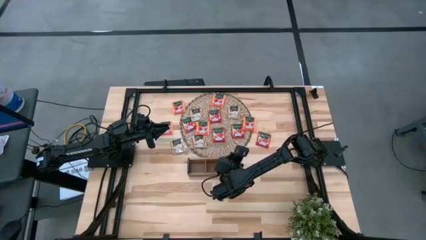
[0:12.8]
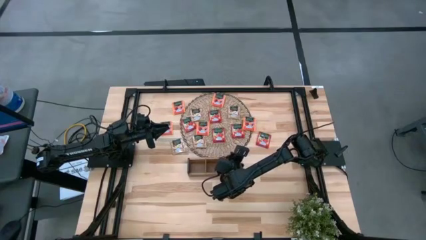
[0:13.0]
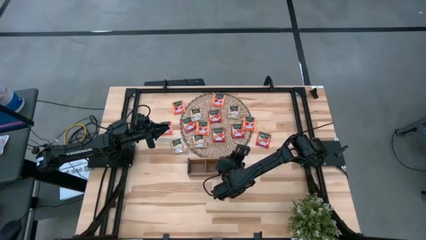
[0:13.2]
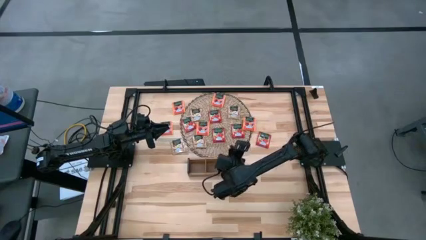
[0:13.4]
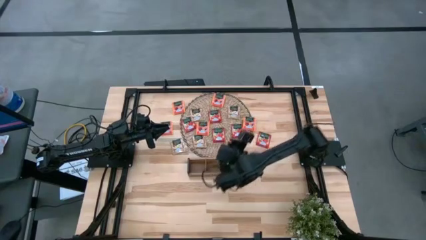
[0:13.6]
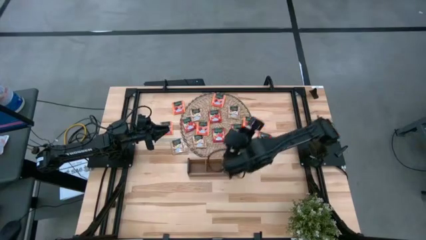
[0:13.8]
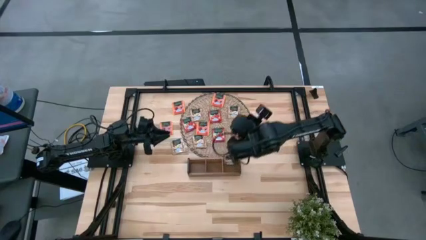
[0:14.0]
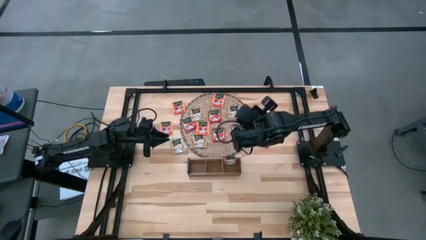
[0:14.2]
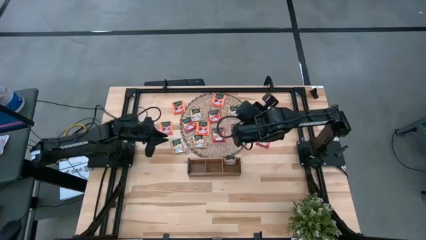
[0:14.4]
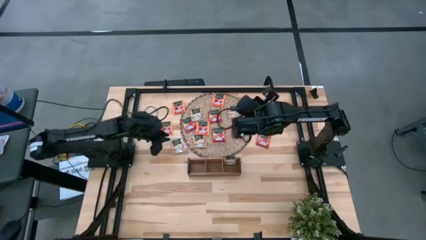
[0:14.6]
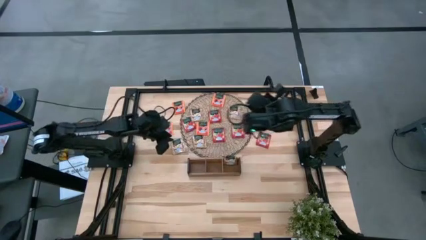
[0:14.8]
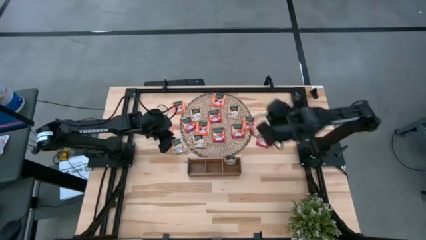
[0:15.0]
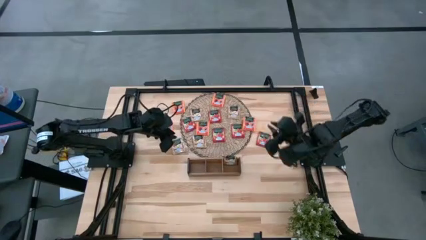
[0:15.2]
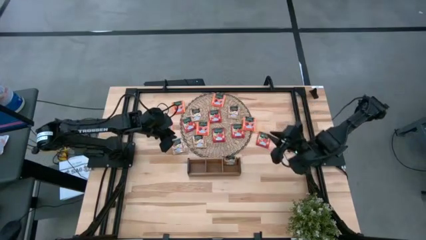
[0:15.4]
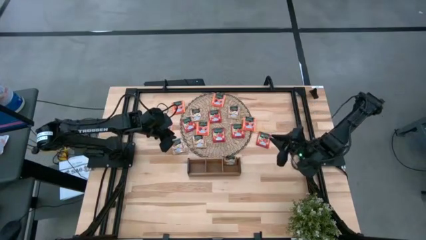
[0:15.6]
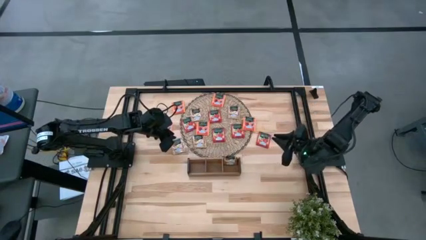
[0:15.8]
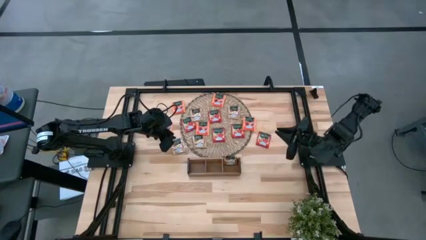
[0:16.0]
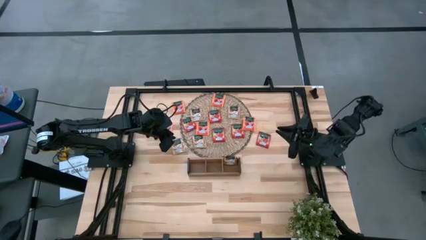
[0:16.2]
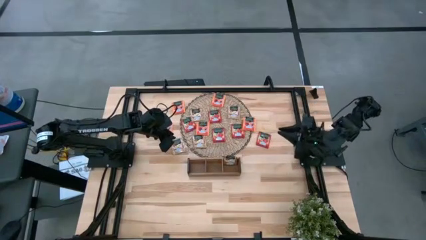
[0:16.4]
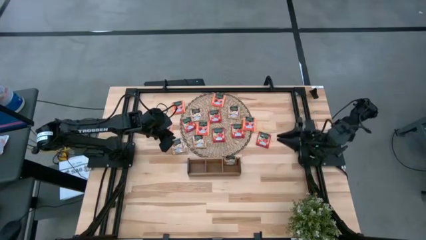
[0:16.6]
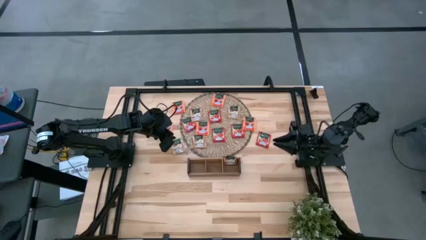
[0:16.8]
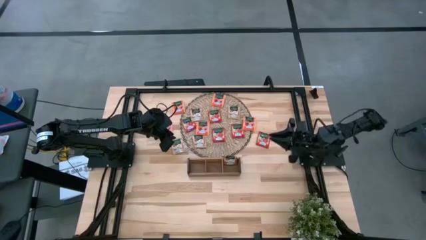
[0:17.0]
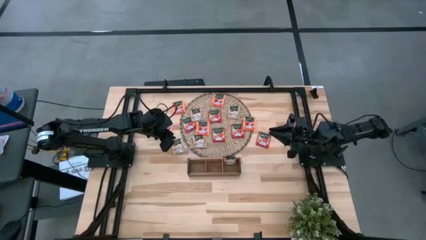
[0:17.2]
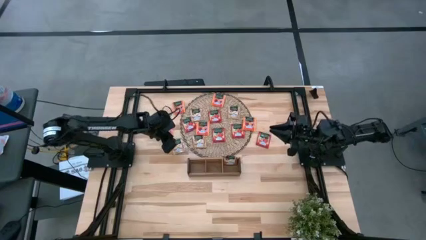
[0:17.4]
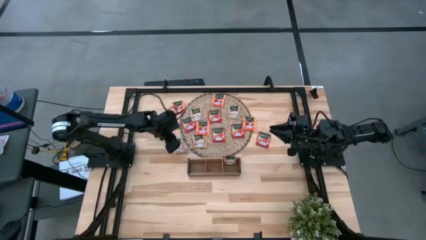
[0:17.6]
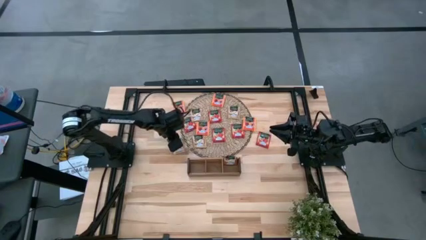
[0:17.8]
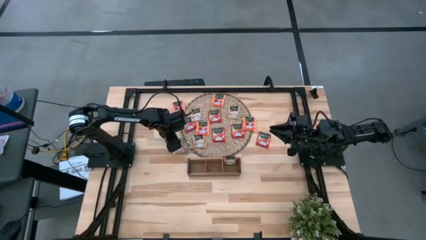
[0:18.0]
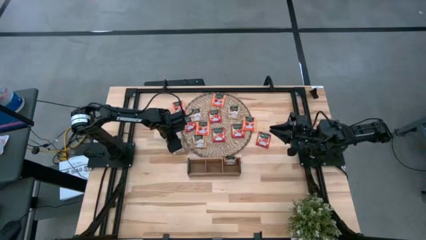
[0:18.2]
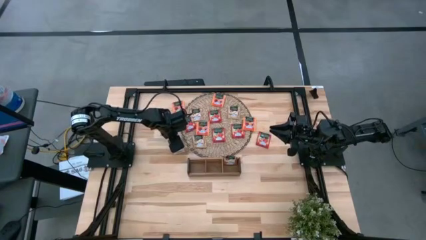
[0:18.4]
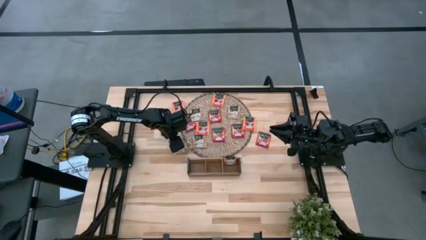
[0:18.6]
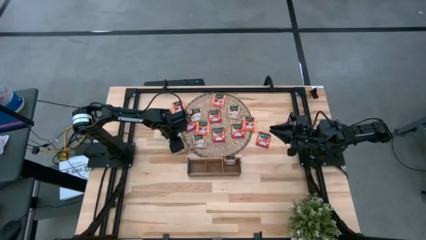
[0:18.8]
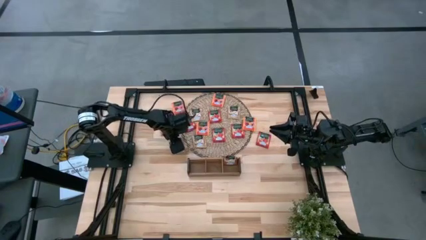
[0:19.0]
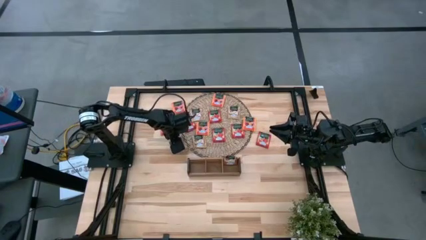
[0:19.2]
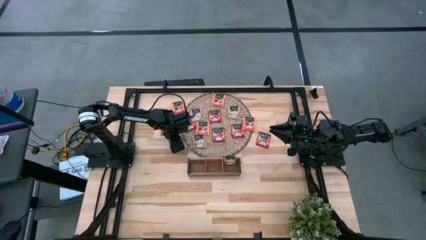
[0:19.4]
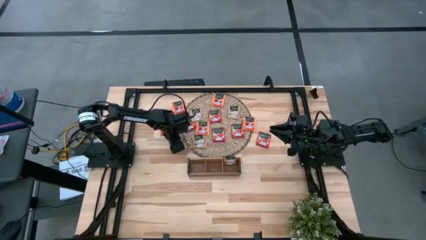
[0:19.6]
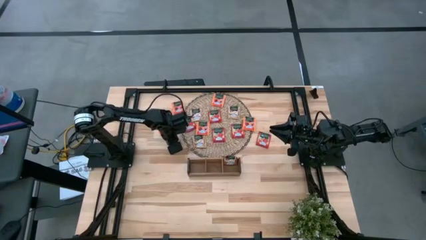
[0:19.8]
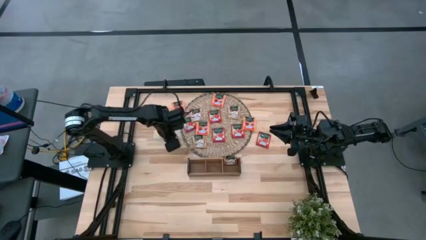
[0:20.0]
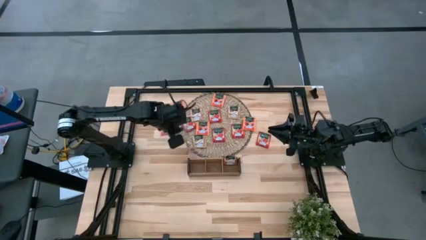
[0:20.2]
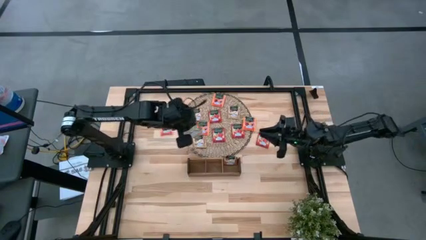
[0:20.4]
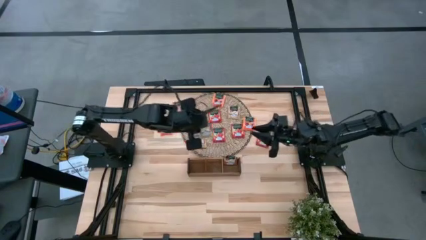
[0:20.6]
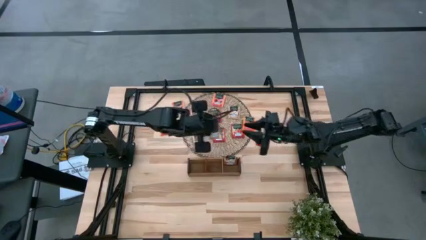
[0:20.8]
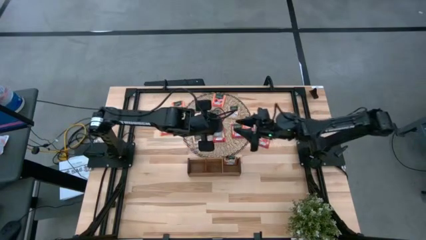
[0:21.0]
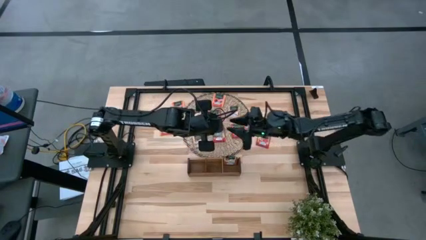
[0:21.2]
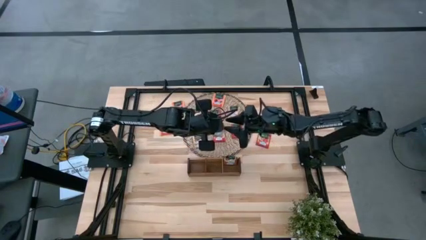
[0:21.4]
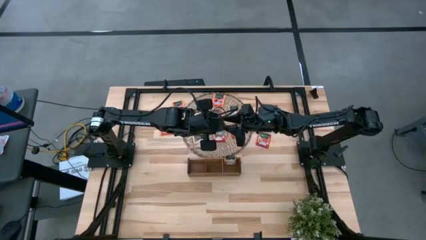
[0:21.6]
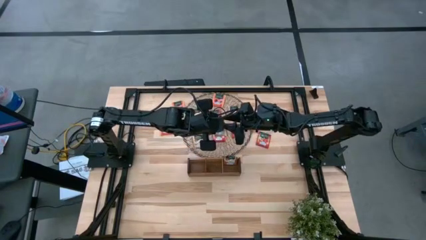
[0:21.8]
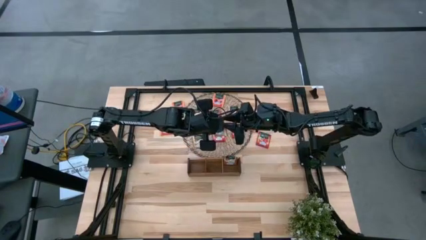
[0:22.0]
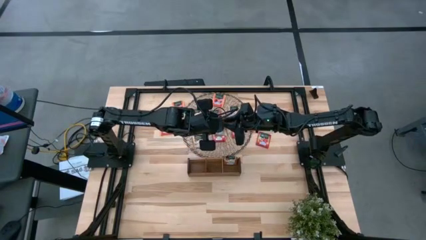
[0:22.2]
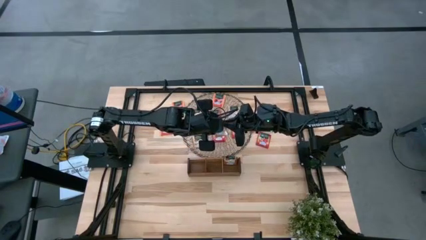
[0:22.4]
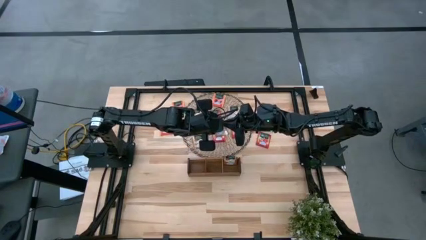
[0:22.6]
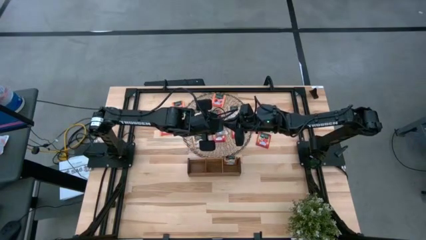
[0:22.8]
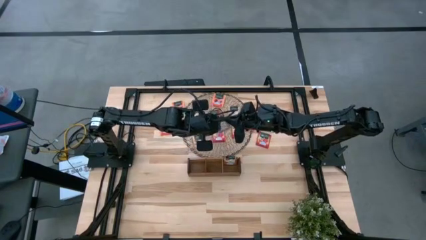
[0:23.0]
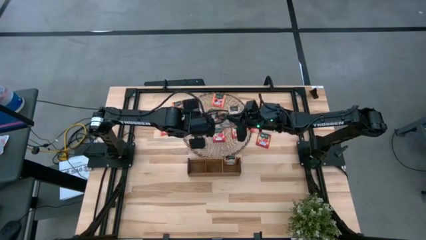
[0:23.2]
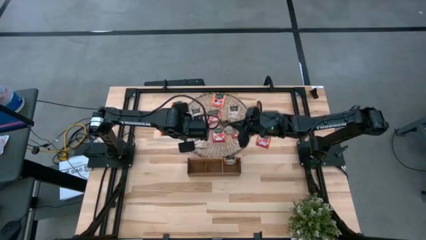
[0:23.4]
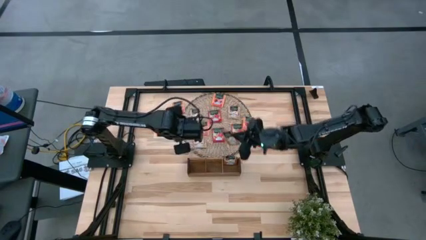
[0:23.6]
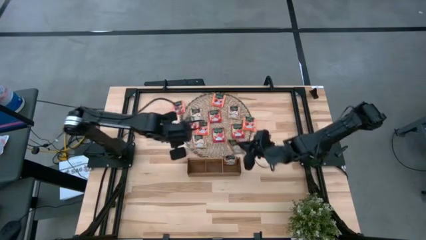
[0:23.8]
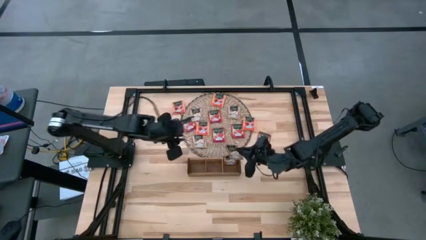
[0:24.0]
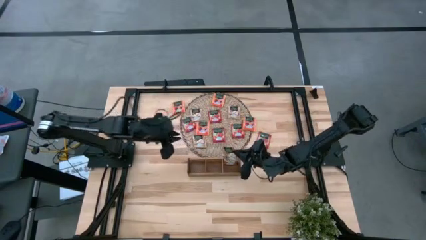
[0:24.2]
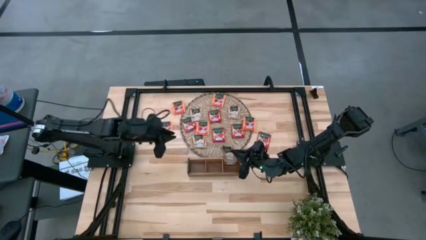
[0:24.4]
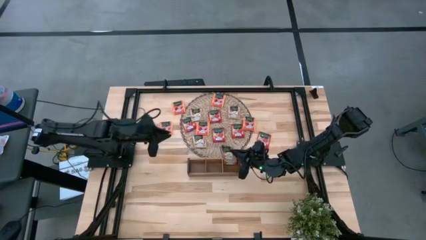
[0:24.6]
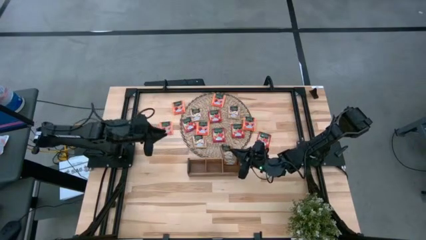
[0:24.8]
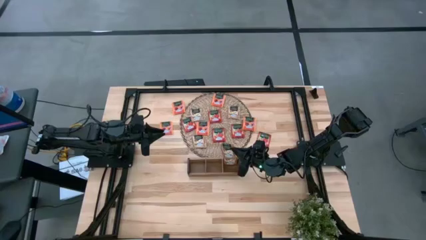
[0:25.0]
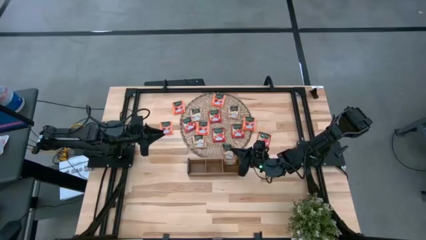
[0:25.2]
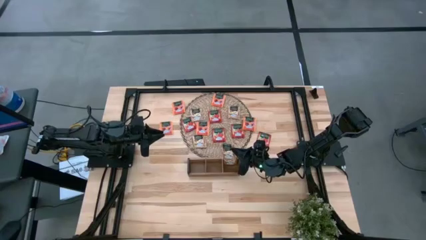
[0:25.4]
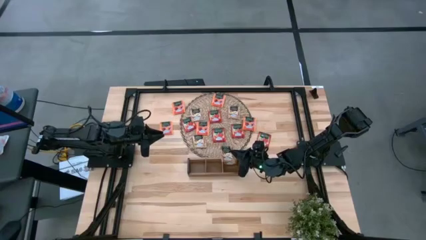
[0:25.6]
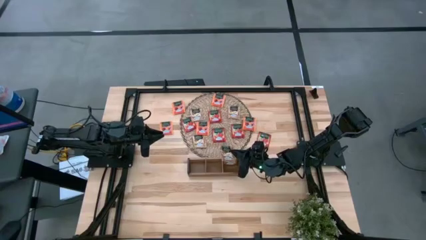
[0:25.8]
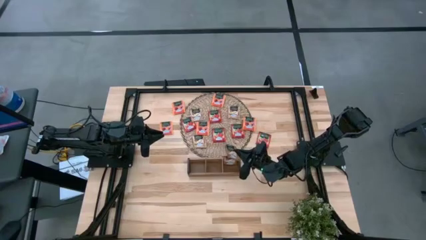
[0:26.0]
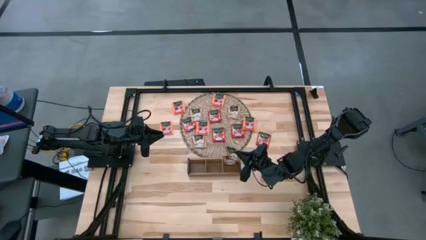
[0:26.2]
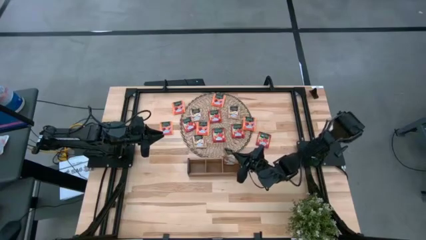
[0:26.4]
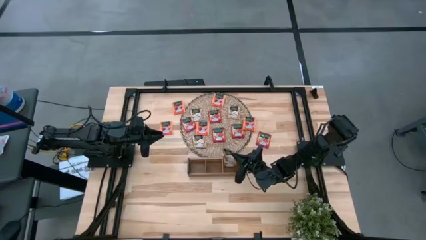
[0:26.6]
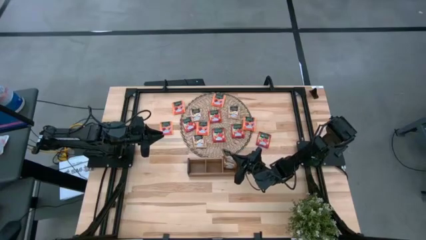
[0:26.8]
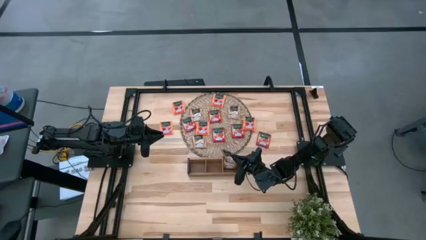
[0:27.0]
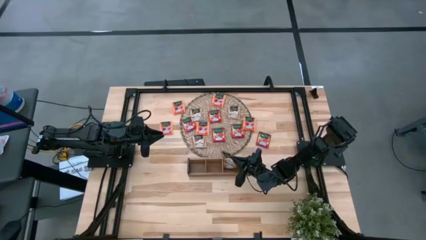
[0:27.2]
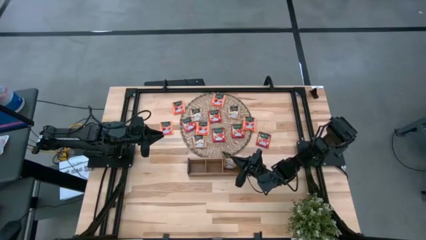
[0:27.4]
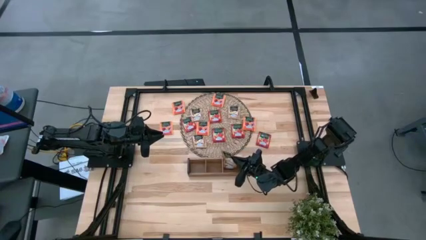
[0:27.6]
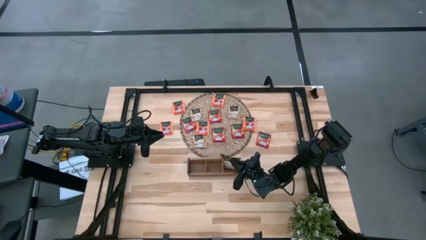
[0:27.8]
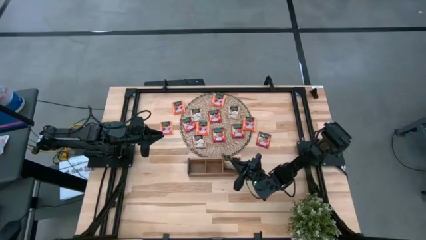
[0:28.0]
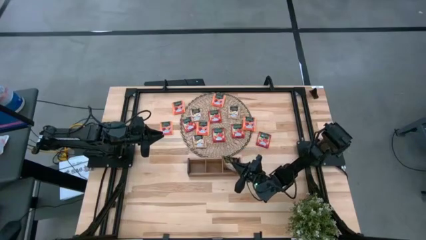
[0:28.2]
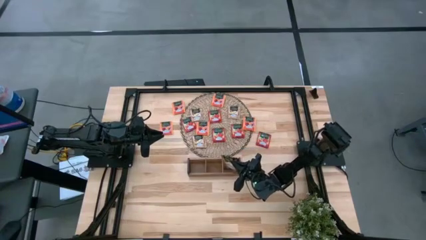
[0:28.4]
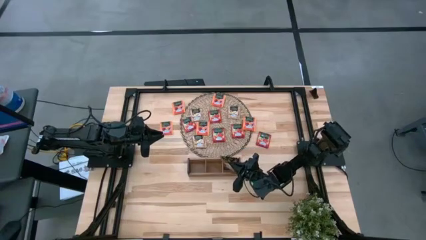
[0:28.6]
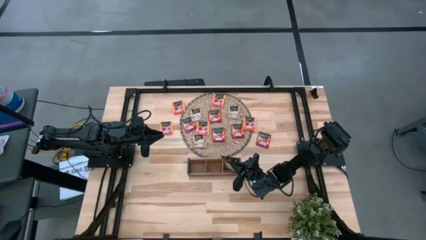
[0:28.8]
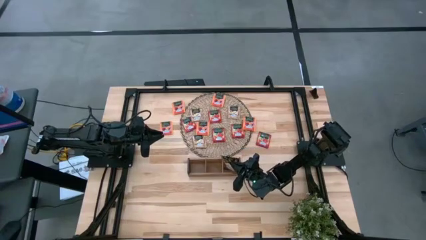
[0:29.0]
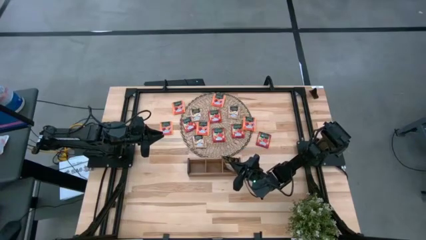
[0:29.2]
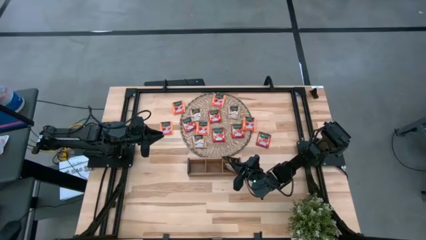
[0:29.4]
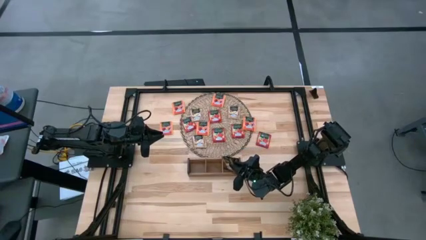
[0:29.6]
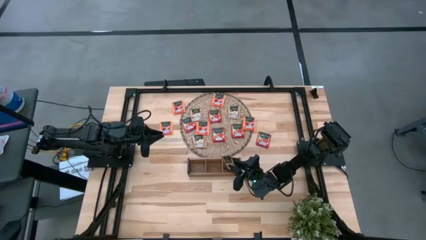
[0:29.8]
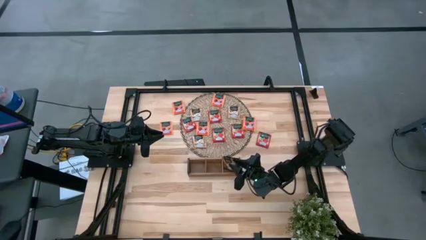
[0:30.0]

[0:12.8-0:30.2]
Task: Pick & Place Tea
Put the gold tea bag into the right section of the wooden organizer
